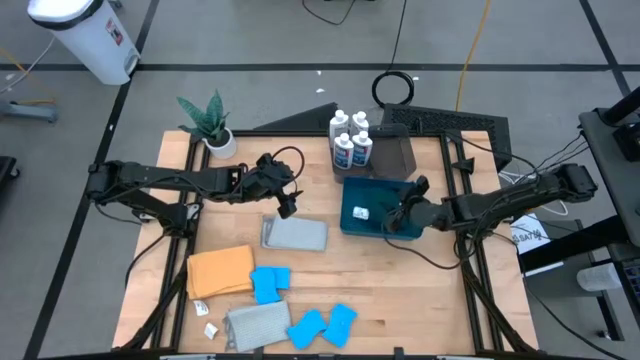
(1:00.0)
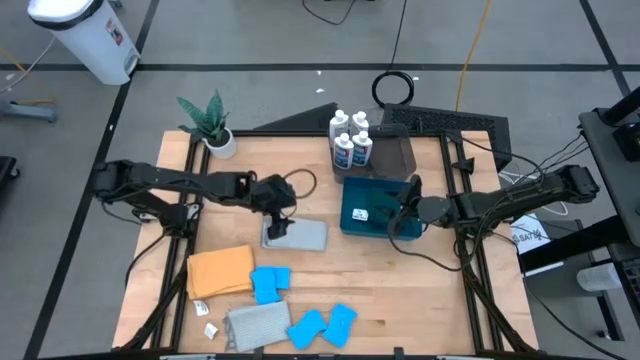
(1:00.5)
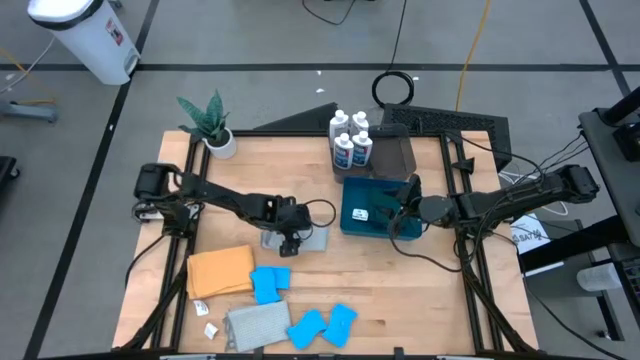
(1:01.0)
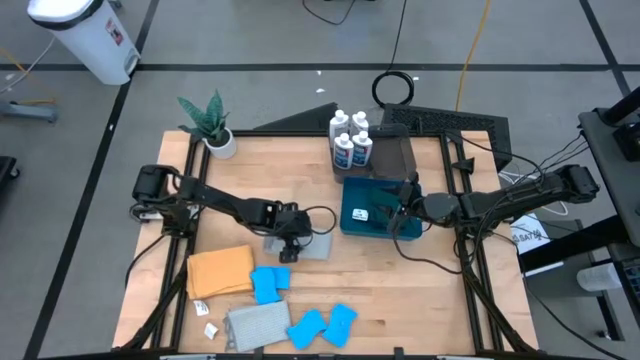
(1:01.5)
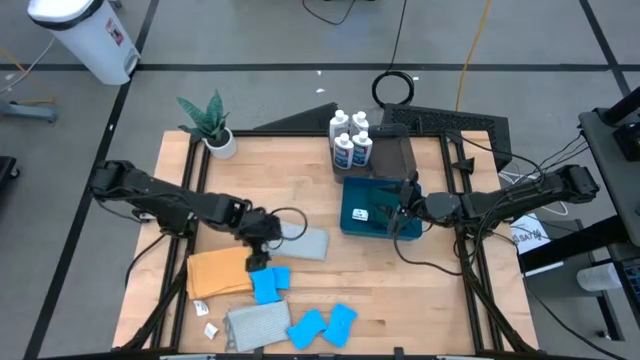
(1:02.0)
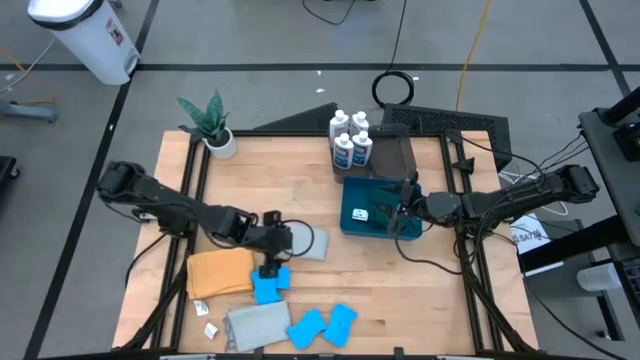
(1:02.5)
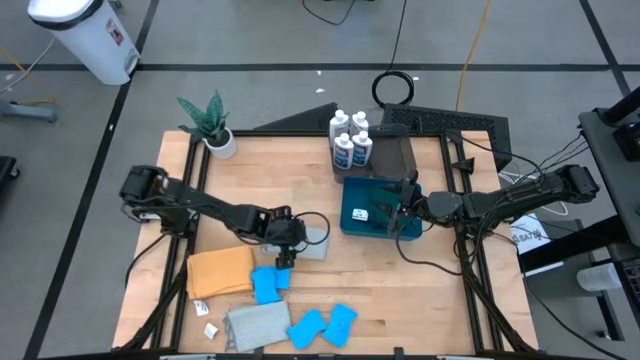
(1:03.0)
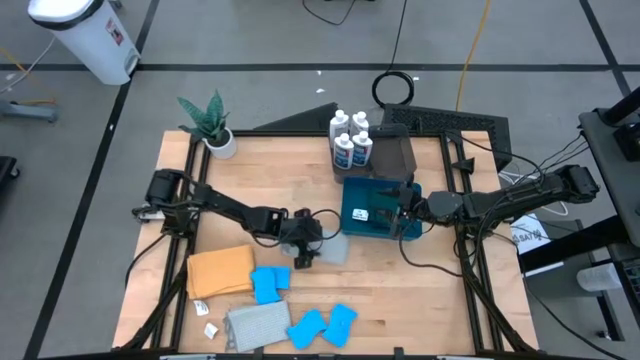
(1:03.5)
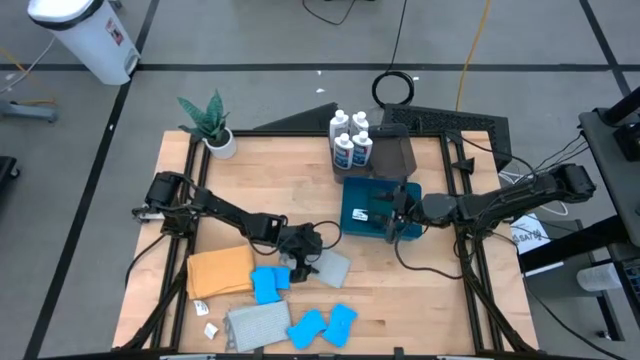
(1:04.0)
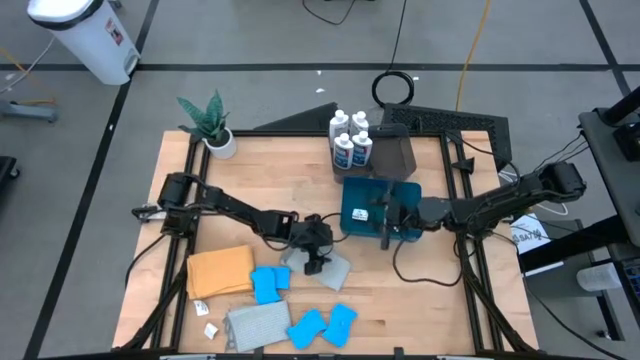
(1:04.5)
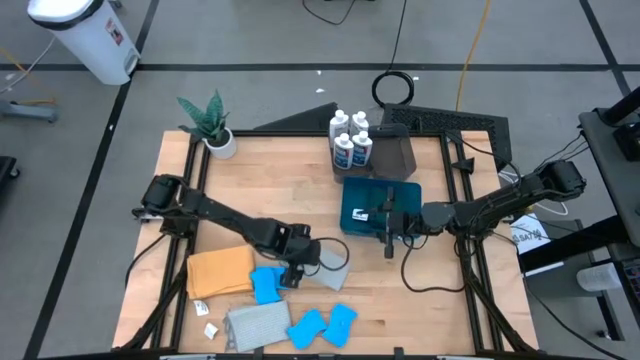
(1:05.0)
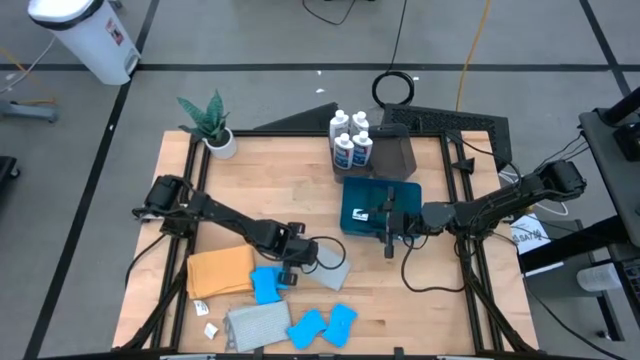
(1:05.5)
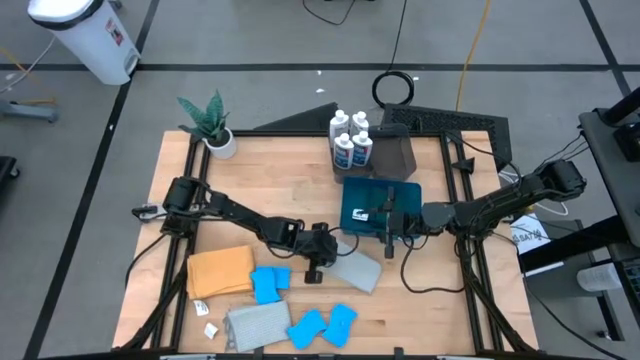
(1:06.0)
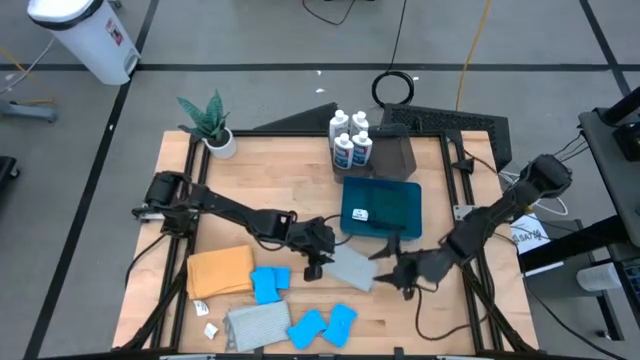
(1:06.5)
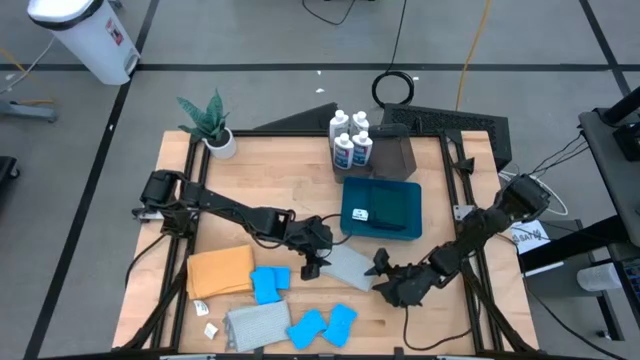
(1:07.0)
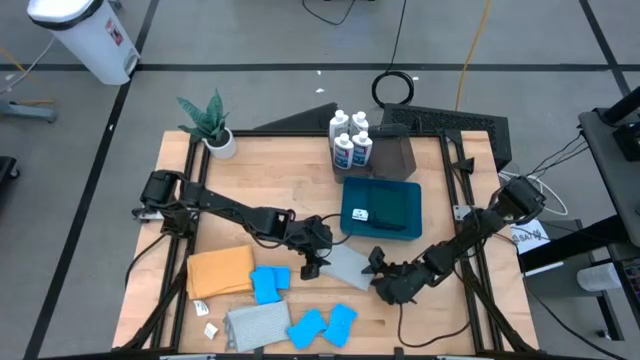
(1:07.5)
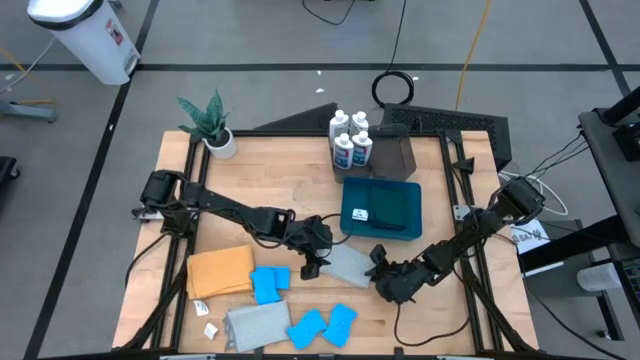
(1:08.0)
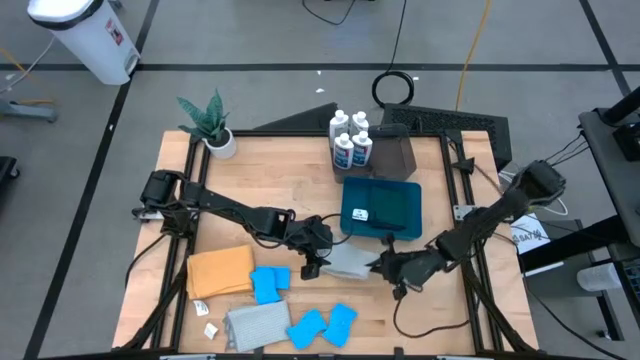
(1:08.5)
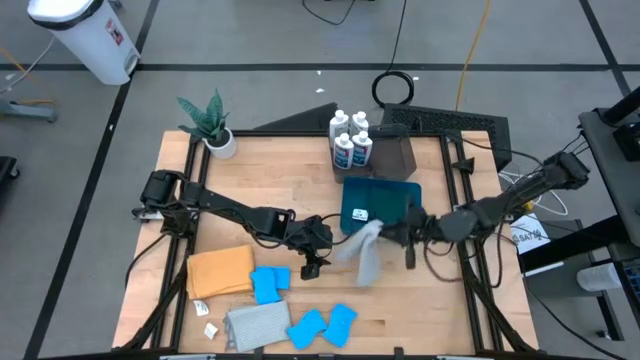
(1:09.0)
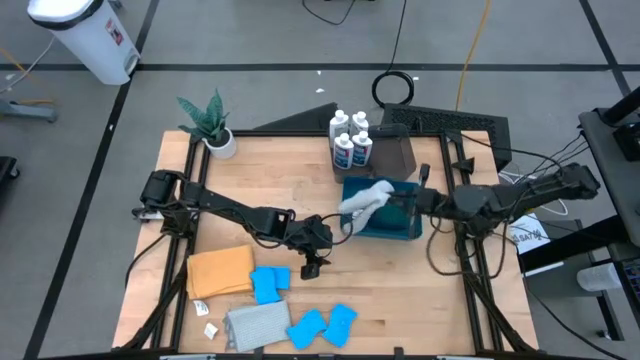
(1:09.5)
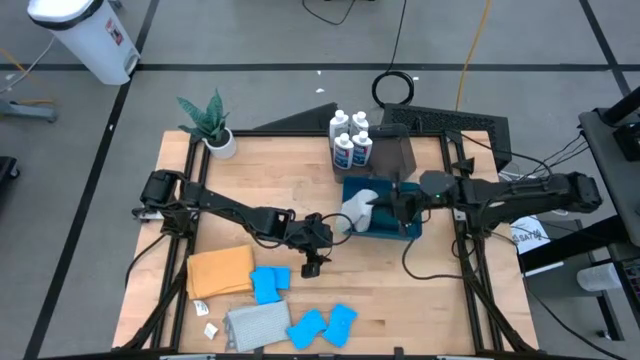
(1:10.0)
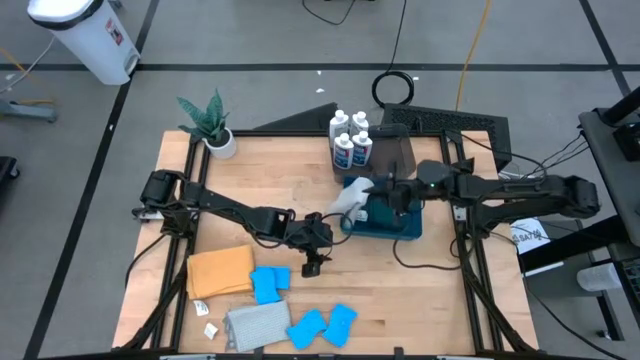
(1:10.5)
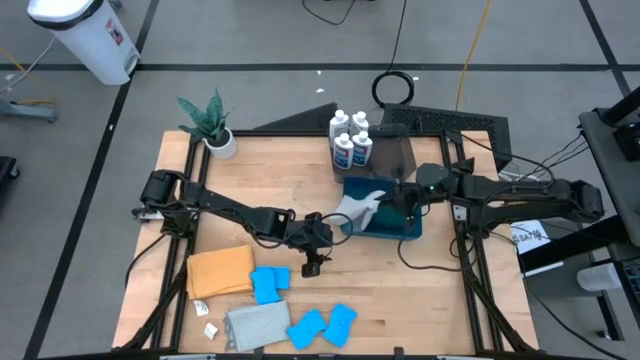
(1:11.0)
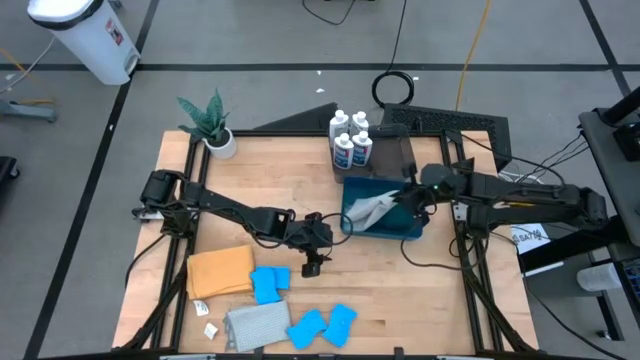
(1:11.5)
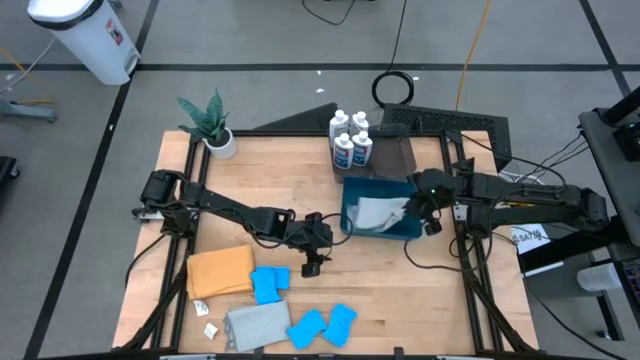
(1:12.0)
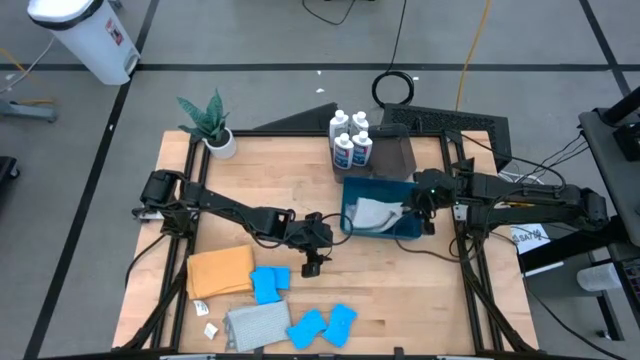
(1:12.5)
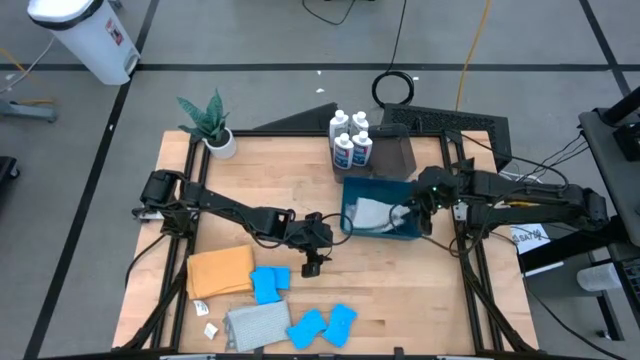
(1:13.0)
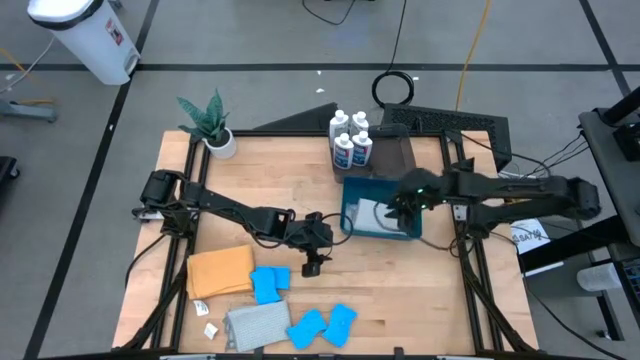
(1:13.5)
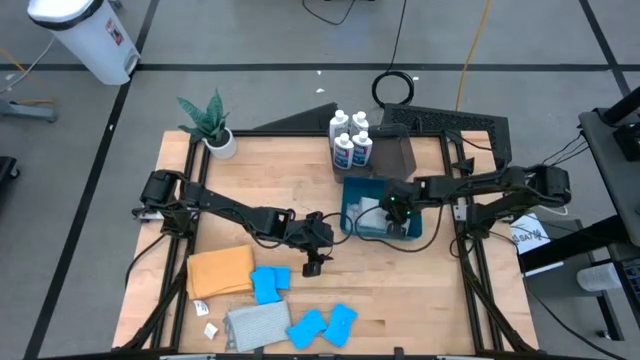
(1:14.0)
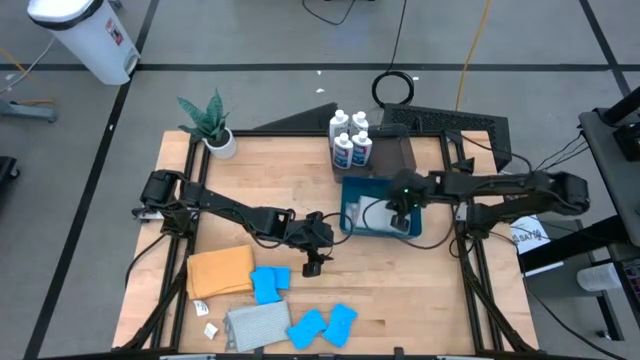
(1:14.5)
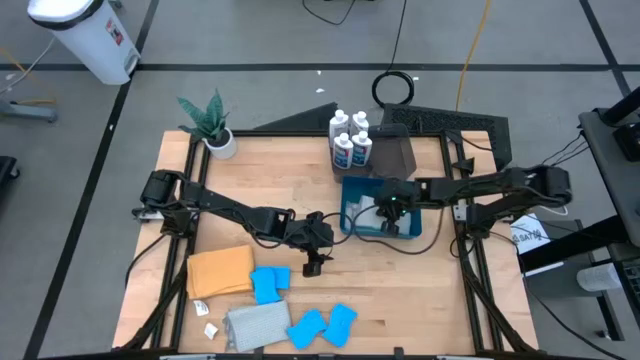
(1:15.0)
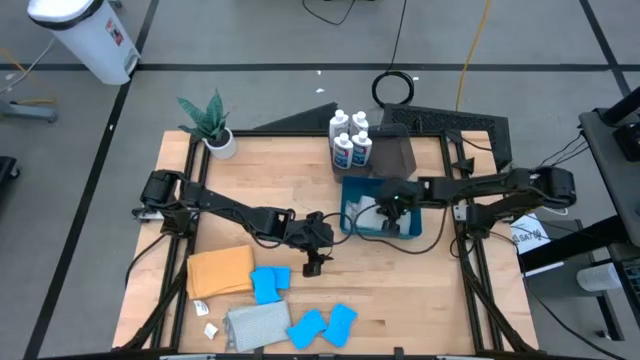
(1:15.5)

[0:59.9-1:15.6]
Task: Pick & Place Kitchen Items
Put the black napkin into the blue bin

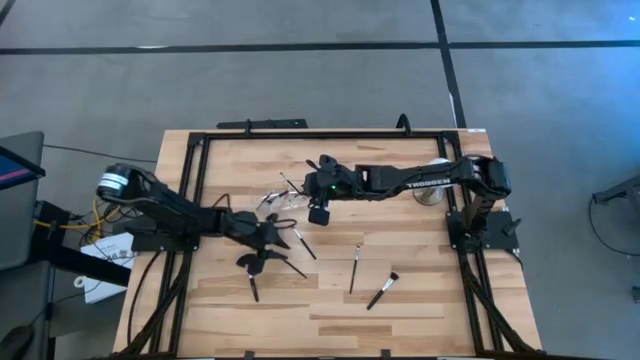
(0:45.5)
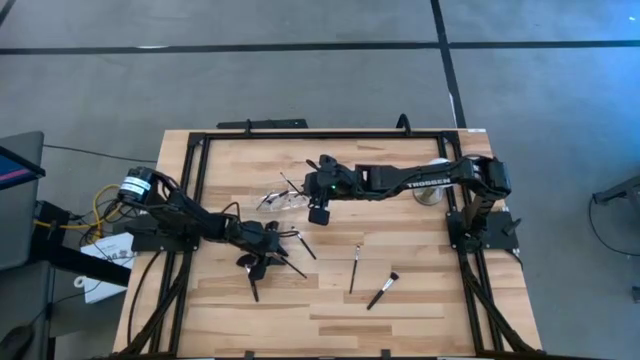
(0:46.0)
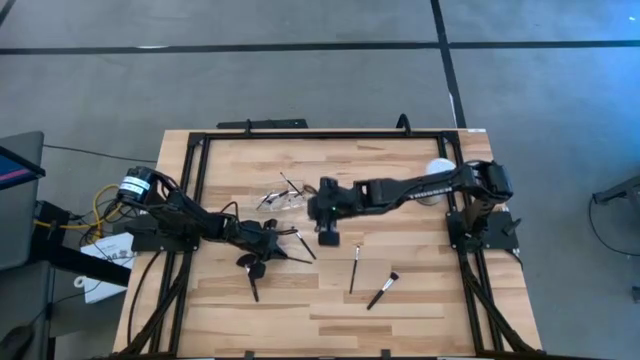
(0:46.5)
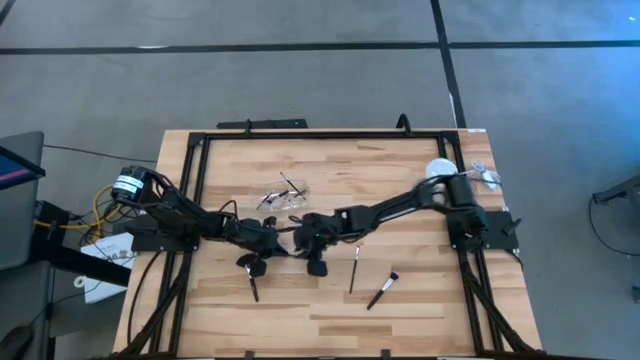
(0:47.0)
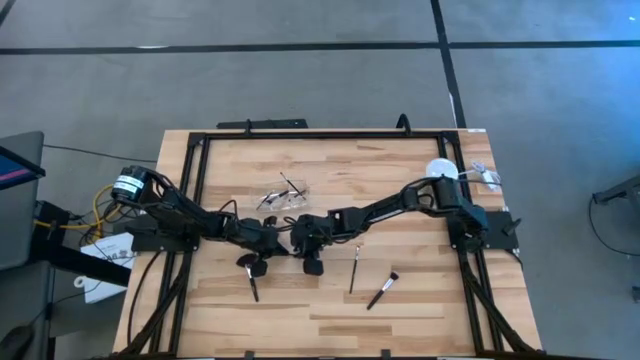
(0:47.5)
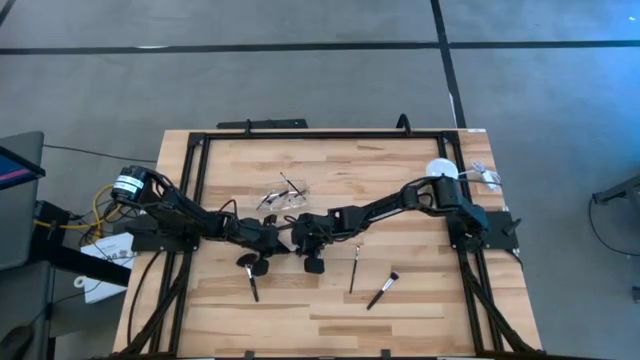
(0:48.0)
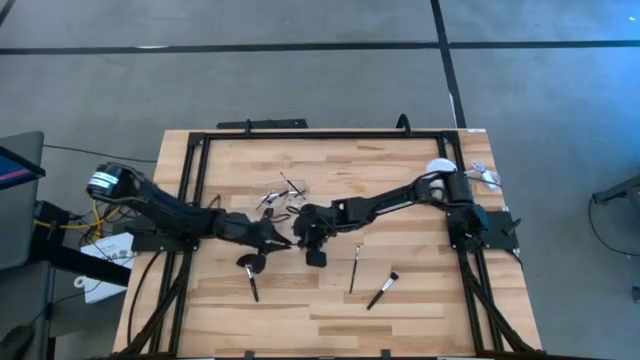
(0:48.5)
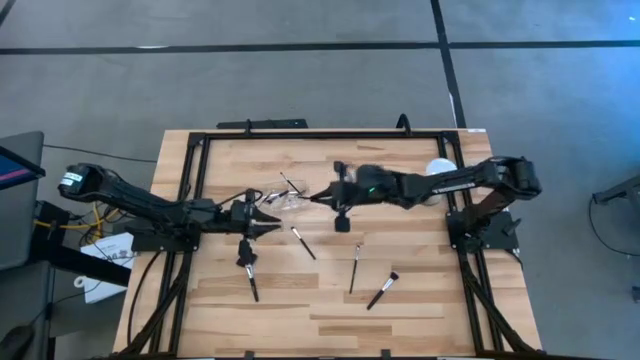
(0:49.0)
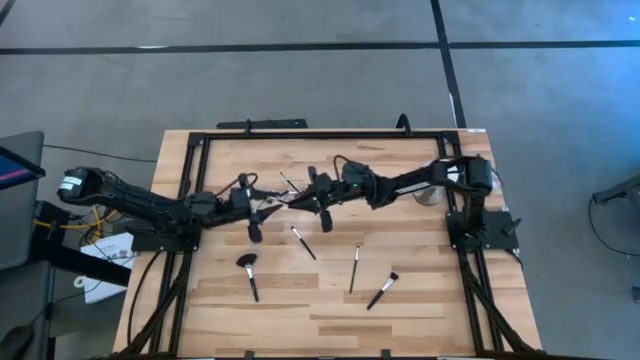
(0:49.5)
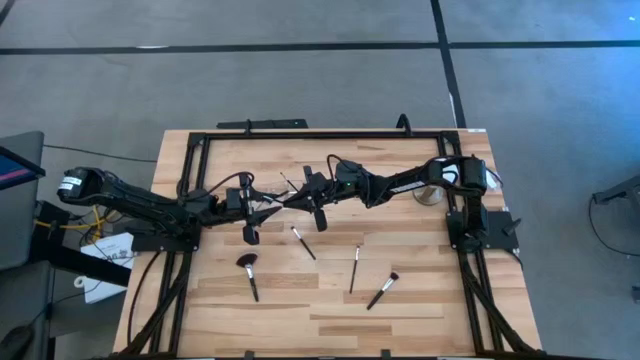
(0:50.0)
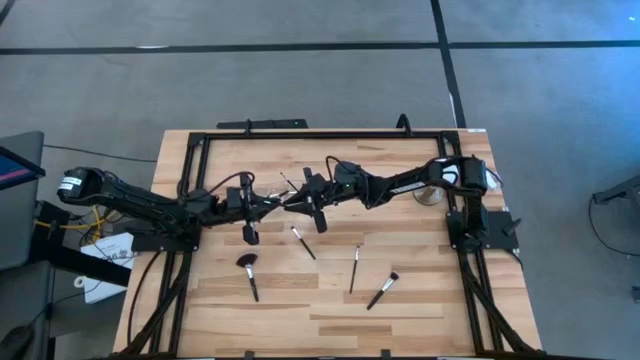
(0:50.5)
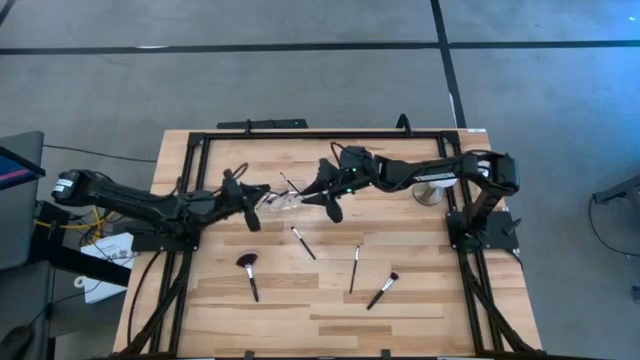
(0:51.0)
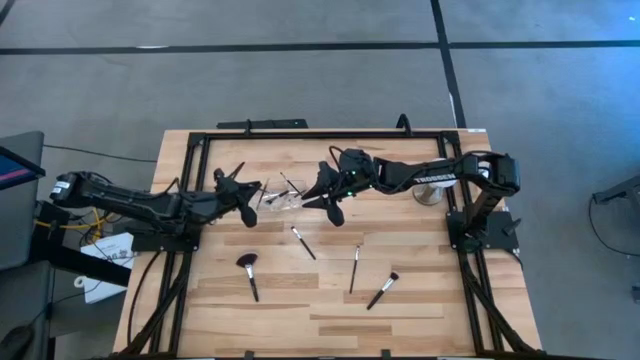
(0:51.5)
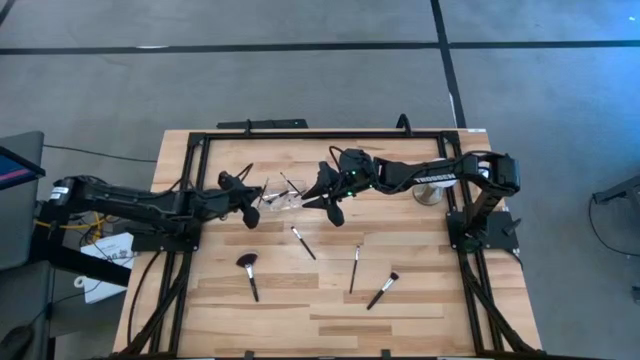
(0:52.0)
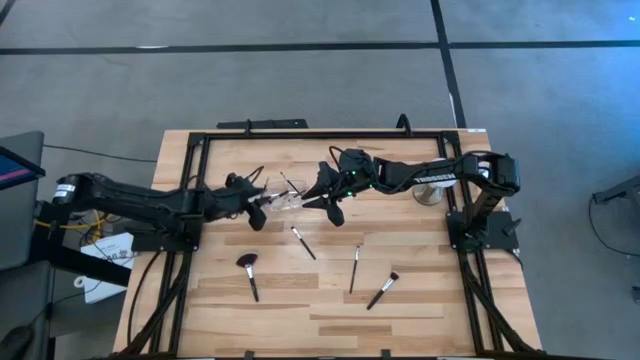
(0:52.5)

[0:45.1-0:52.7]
Task: Put items in baskets/containers
Put the liner brush into the transparent organizer
